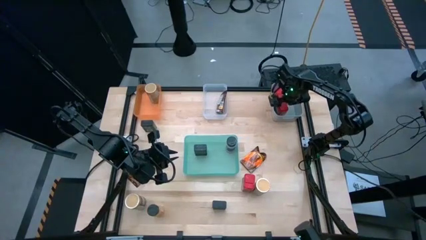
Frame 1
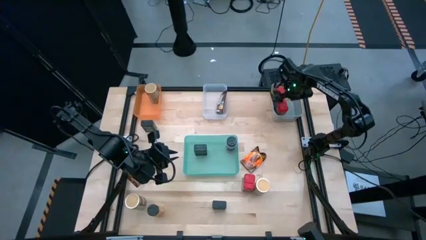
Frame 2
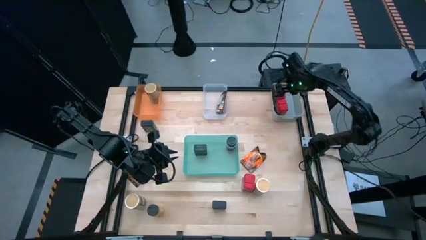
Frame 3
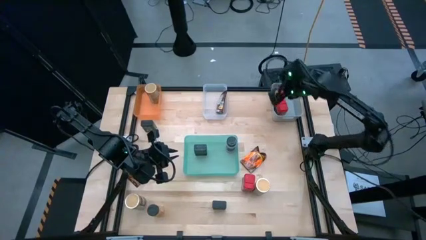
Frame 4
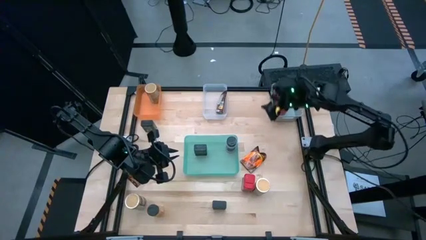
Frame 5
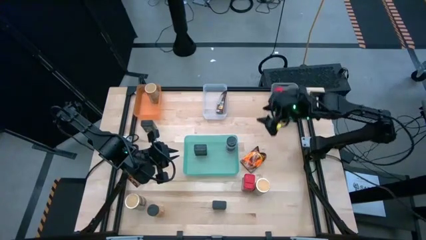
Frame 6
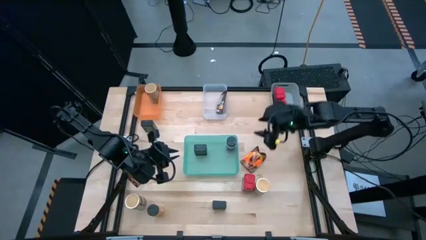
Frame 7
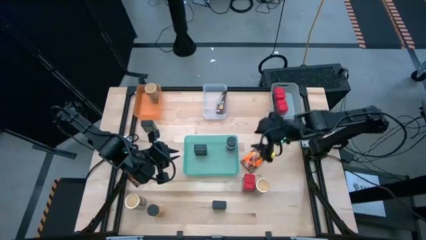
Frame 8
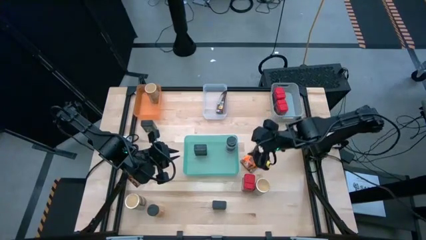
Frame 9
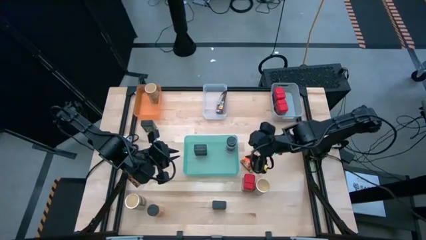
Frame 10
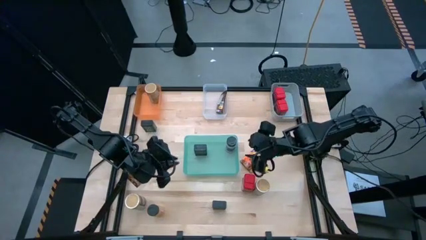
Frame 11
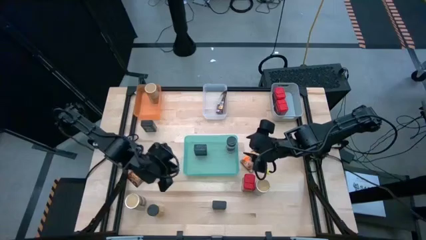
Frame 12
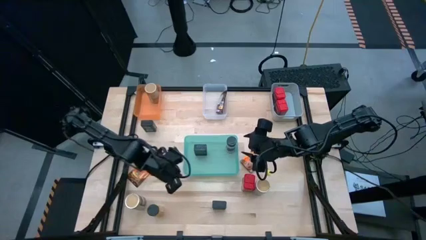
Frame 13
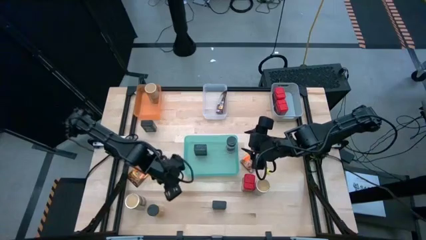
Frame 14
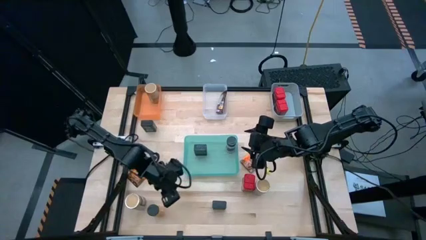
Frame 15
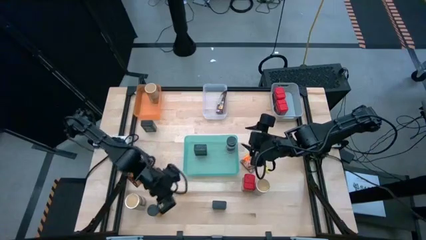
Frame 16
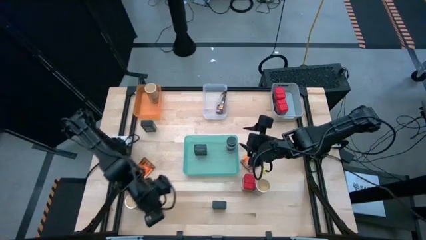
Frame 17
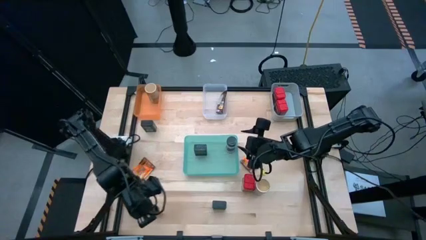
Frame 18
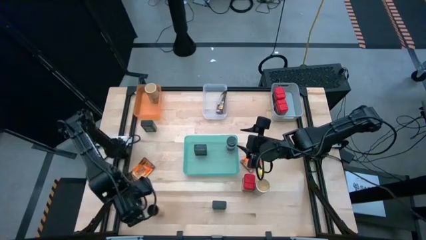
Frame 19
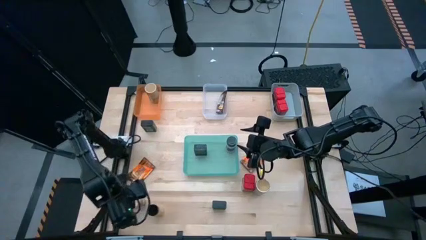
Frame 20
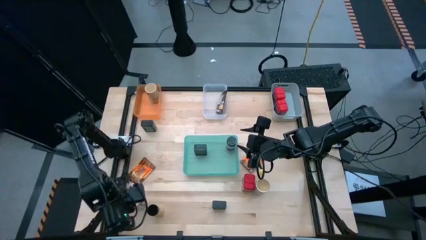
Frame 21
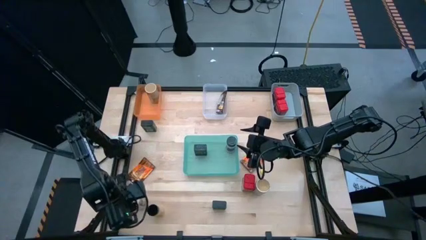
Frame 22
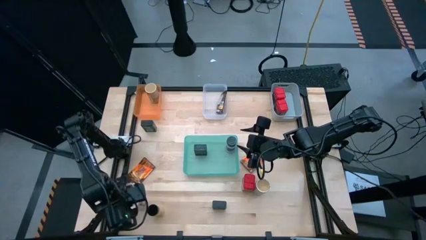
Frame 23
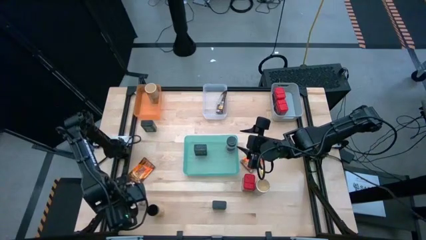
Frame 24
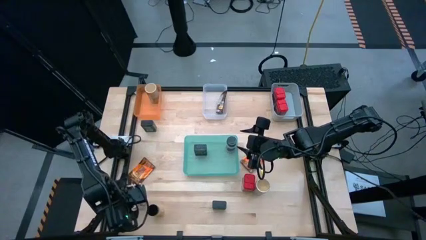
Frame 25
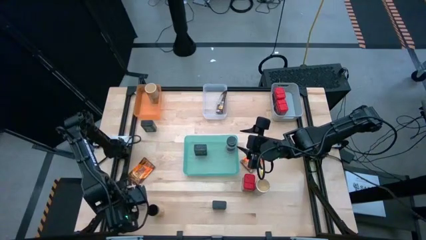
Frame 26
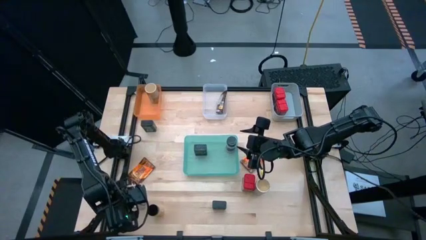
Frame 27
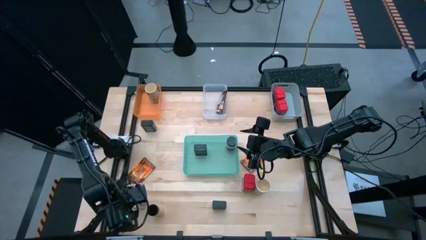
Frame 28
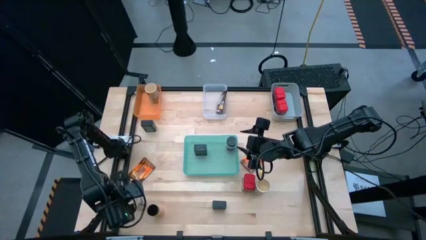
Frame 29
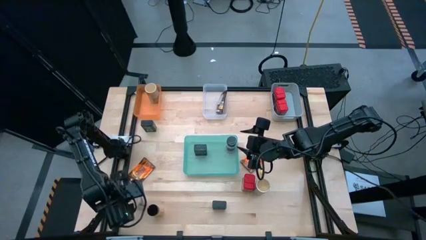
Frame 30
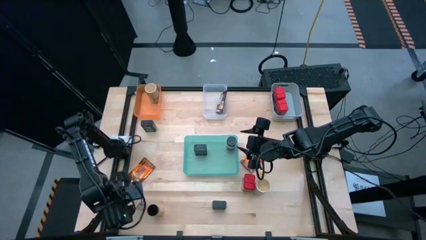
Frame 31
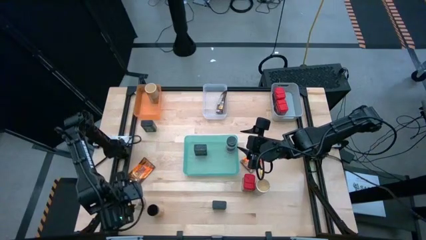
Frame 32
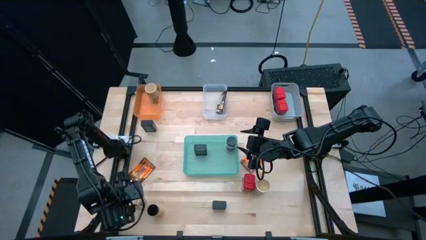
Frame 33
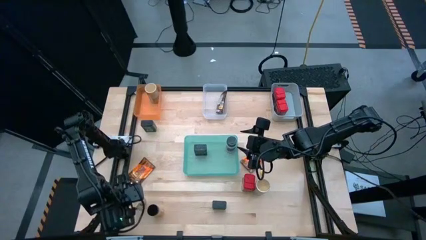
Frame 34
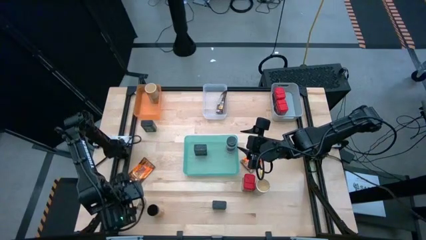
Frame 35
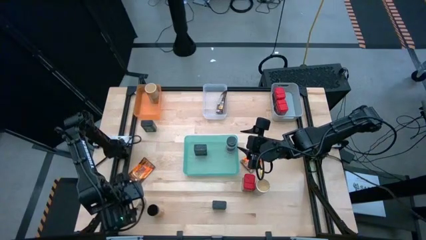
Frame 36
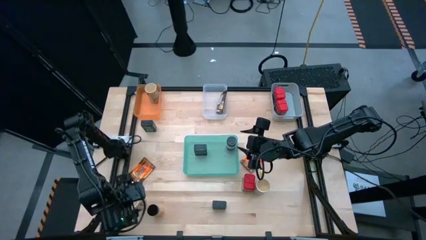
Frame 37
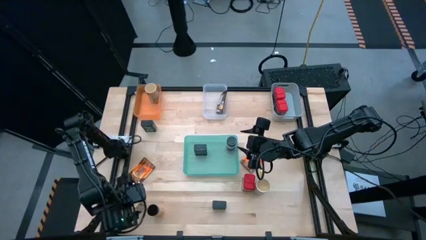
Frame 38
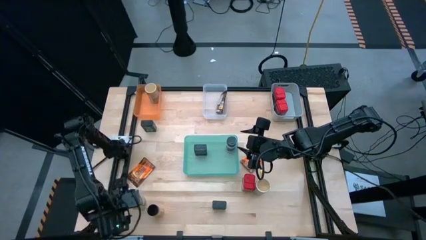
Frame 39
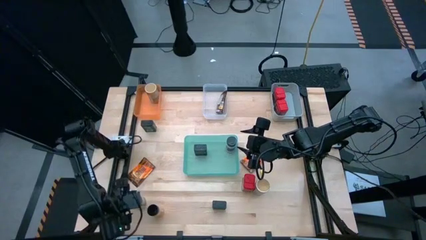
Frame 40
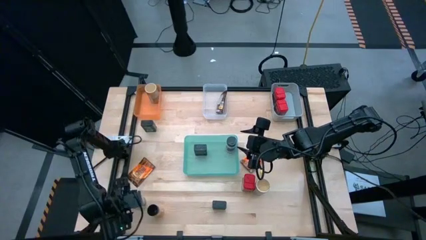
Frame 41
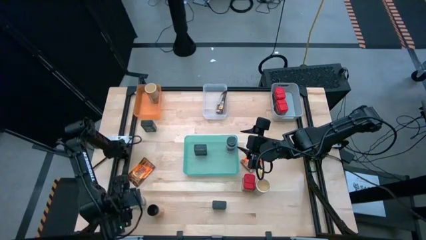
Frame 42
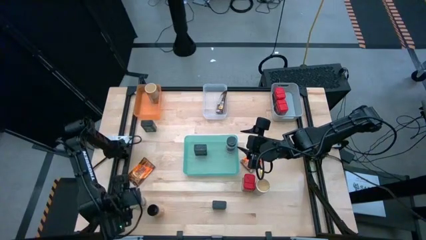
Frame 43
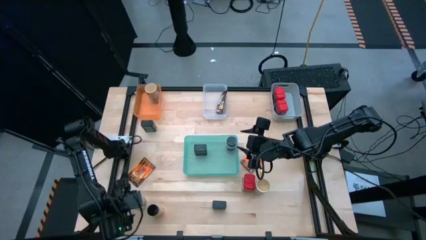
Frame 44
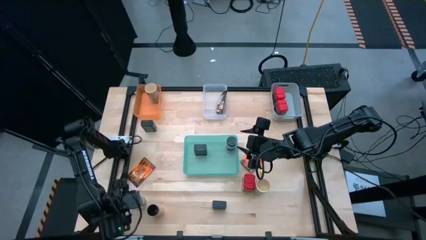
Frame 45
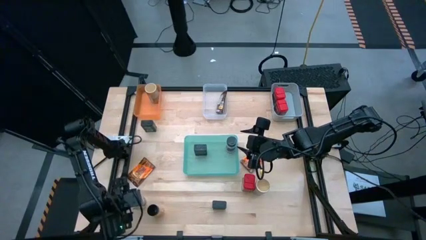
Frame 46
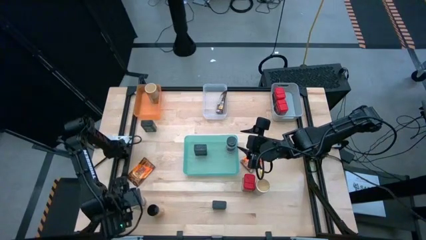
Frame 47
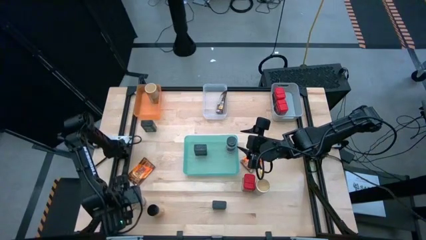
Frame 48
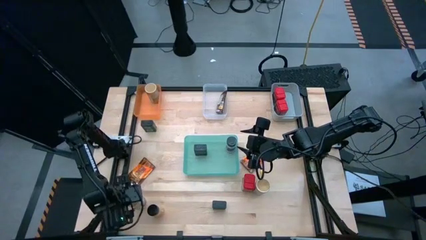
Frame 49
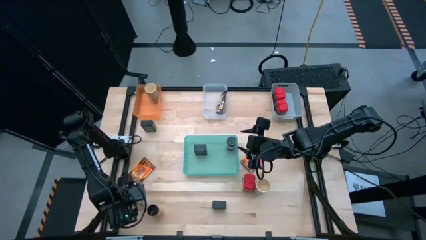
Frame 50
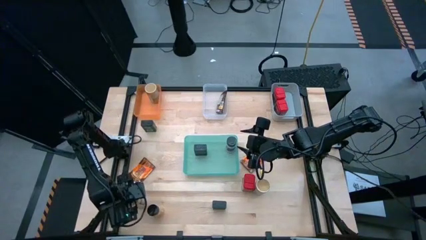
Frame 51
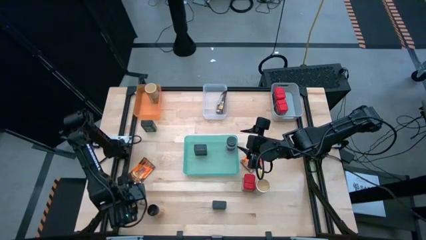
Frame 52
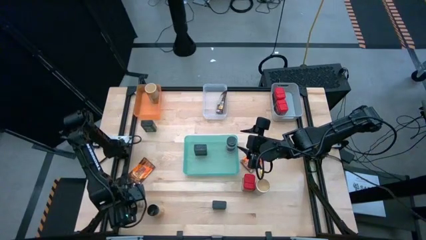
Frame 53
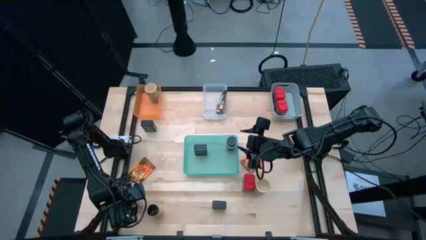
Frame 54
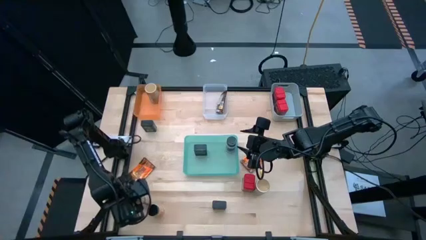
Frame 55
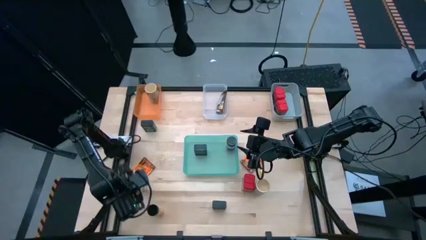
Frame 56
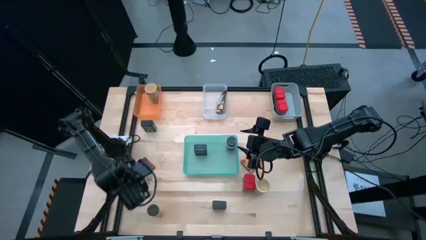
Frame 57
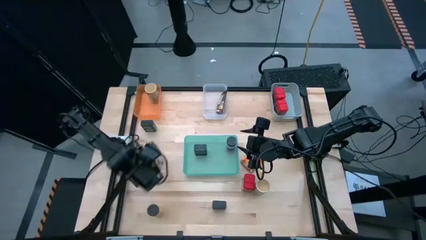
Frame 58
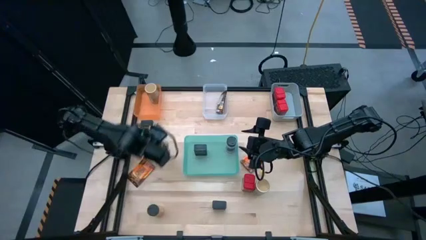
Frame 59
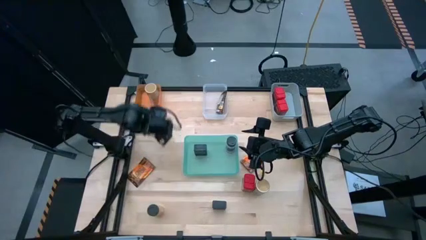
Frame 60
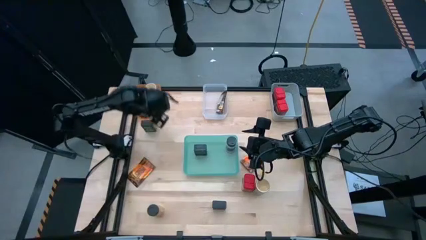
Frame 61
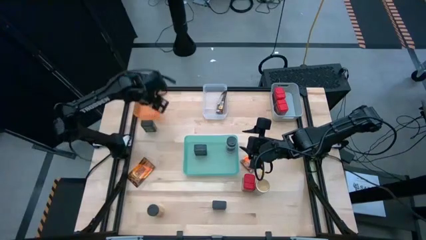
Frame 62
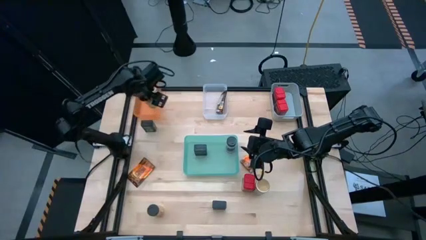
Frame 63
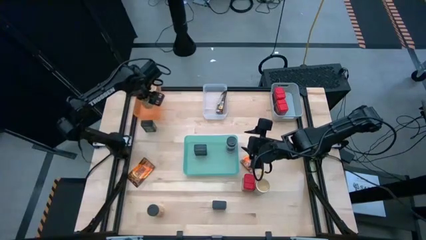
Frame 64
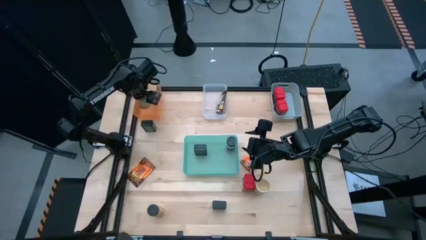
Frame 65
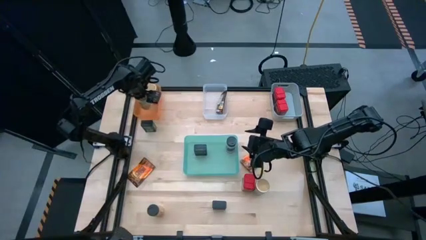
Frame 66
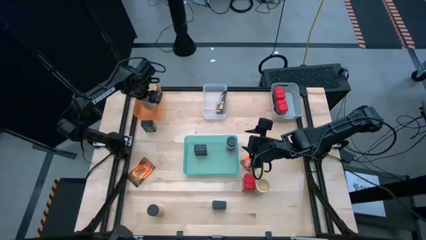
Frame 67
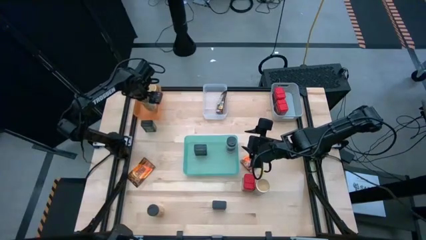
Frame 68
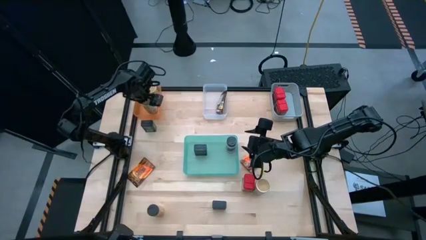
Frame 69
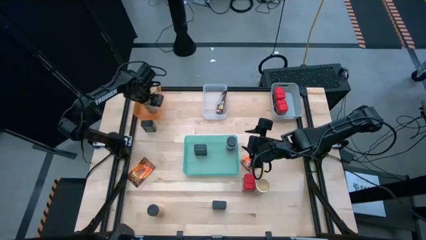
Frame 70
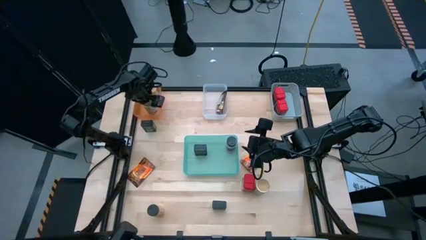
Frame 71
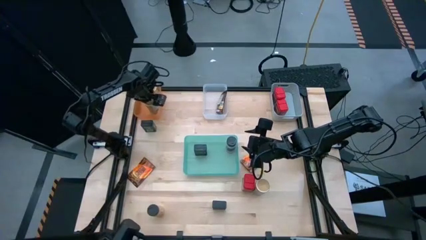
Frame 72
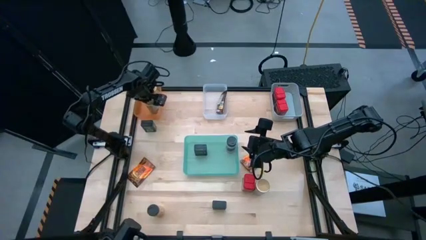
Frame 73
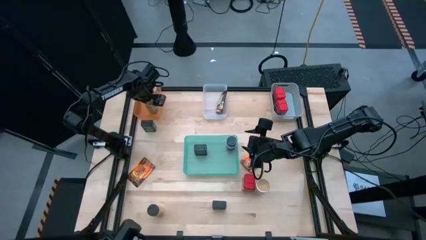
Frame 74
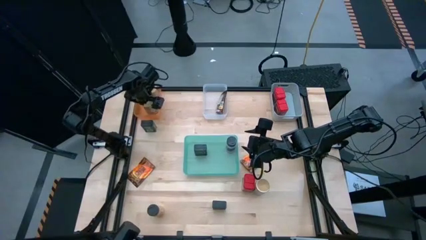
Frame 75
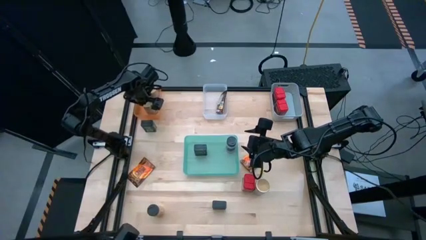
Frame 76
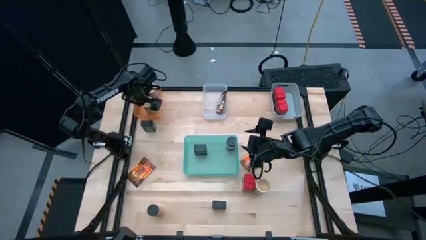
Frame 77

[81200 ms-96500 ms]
Task: Sort spices by type
Put the left gold spice bottle into the orange bin

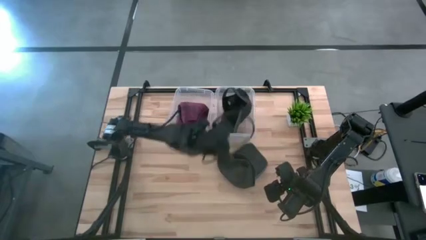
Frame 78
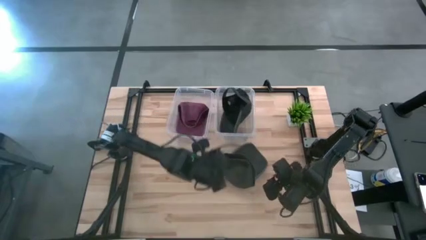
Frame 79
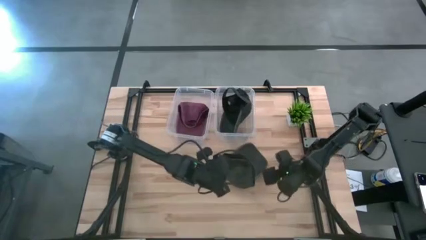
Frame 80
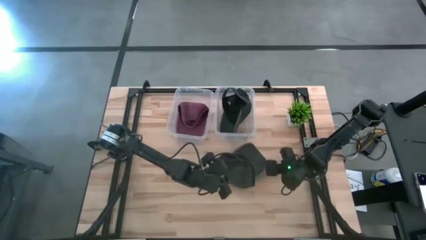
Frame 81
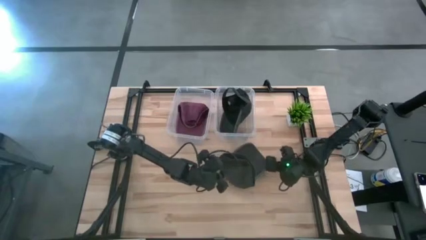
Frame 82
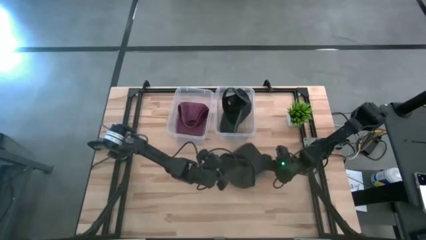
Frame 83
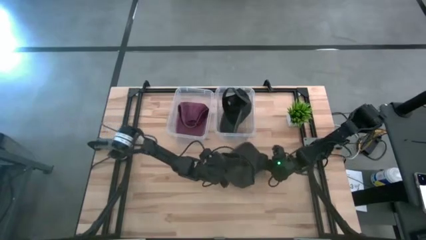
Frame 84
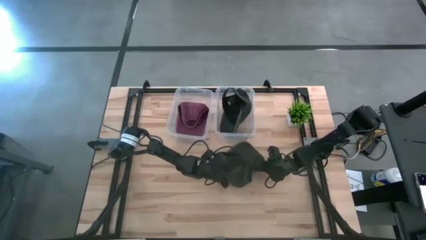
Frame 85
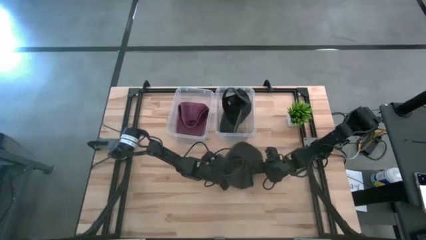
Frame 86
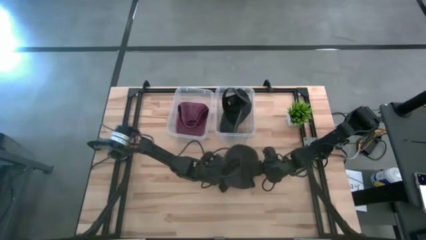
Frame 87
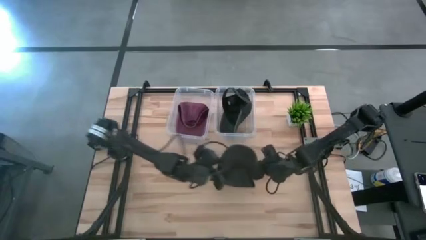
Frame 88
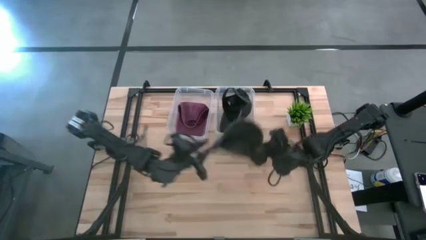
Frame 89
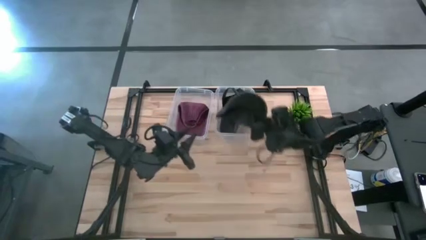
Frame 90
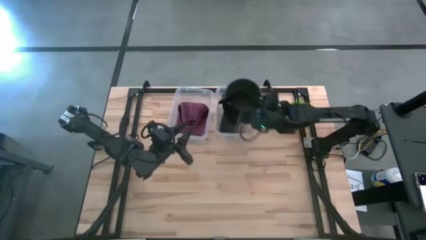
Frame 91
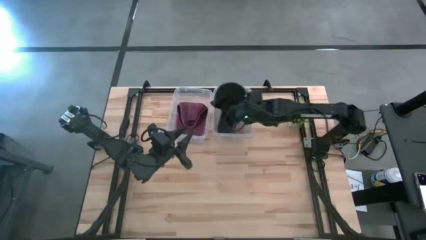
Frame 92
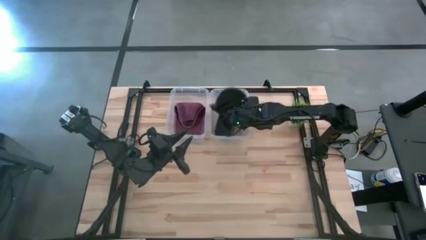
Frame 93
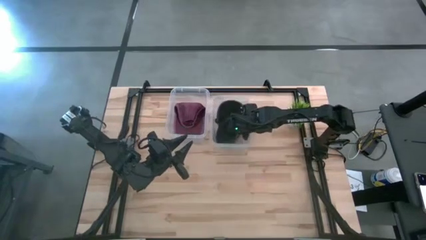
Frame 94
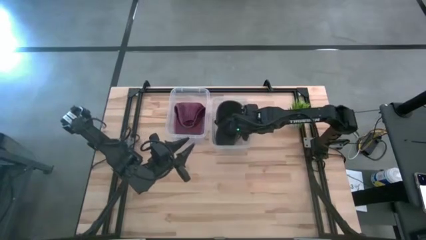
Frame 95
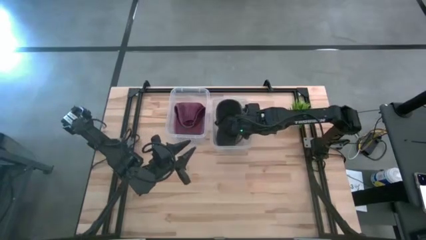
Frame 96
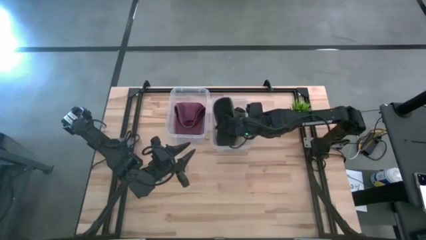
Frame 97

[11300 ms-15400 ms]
Task: Pick & Place hat
Put the black cap into the right transparent bin
